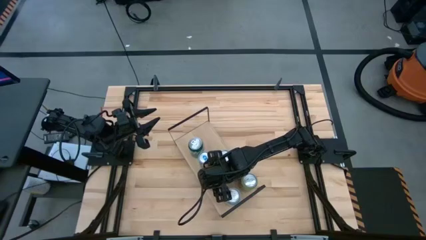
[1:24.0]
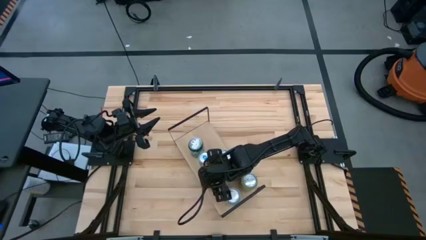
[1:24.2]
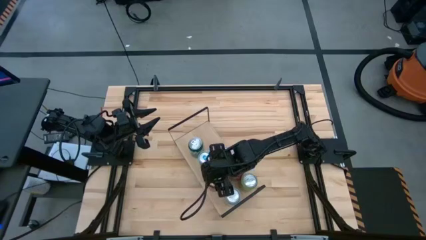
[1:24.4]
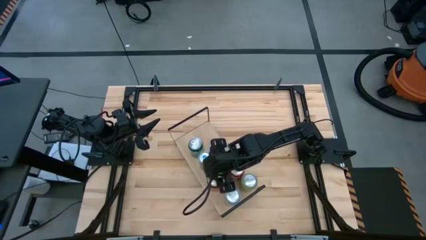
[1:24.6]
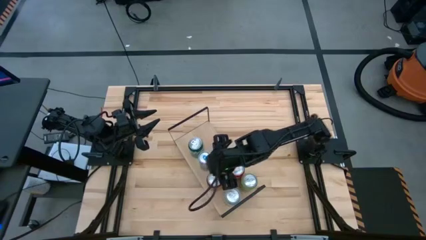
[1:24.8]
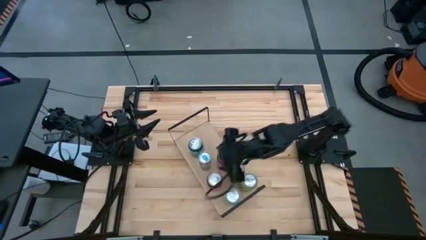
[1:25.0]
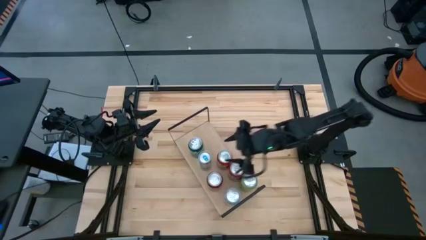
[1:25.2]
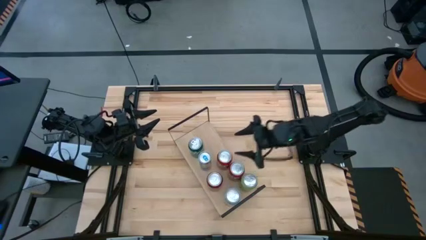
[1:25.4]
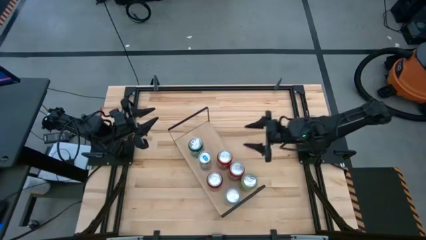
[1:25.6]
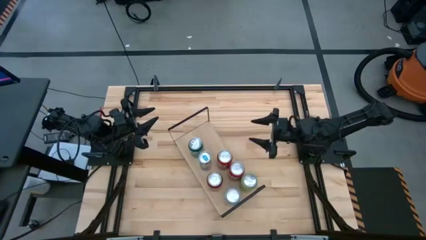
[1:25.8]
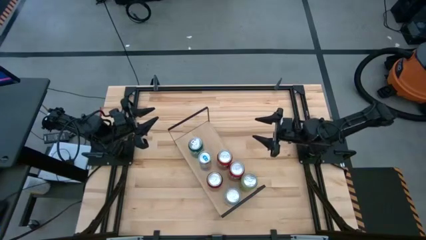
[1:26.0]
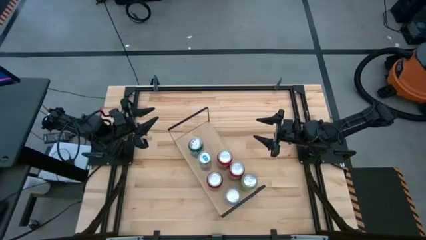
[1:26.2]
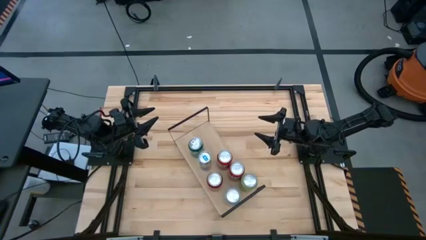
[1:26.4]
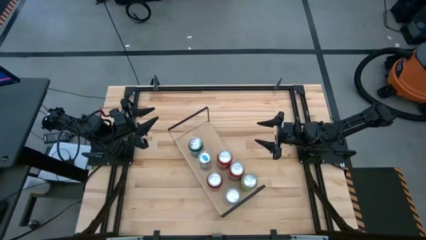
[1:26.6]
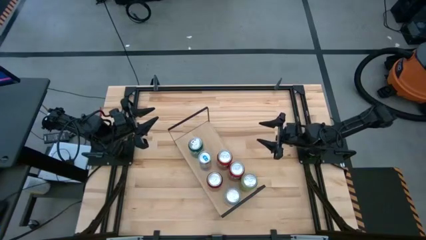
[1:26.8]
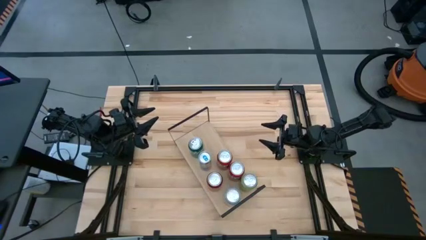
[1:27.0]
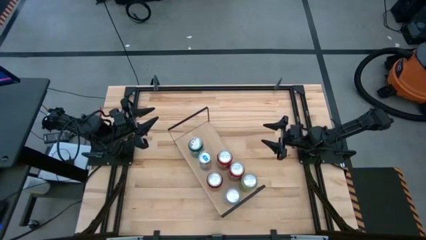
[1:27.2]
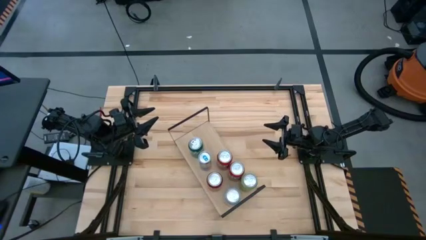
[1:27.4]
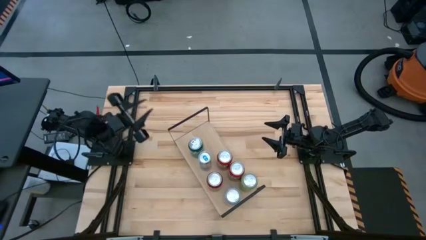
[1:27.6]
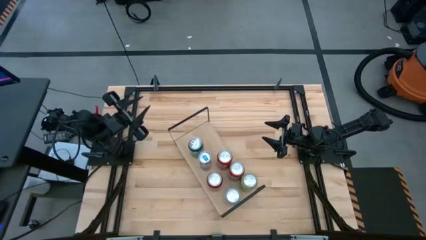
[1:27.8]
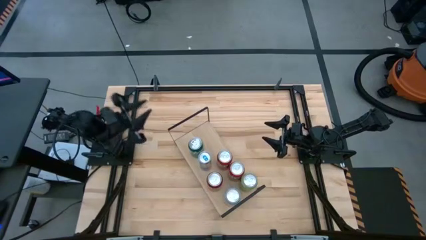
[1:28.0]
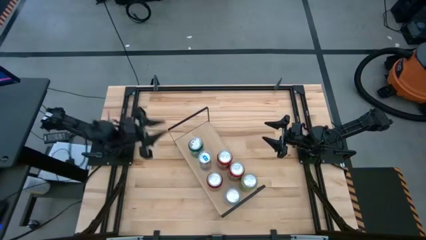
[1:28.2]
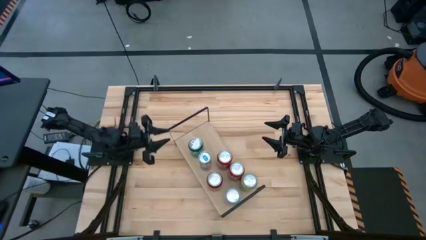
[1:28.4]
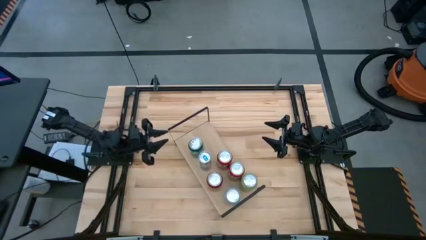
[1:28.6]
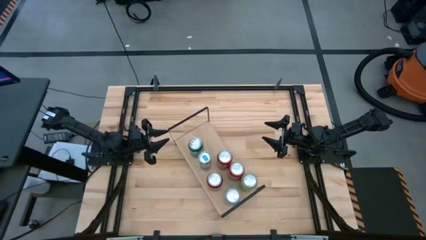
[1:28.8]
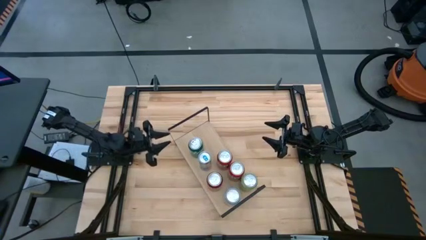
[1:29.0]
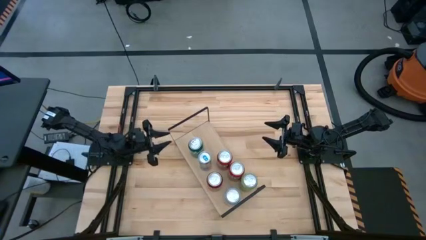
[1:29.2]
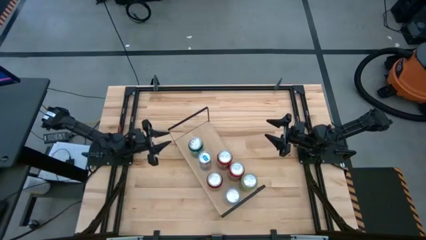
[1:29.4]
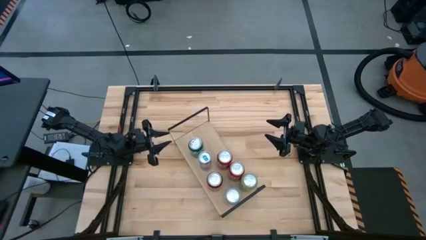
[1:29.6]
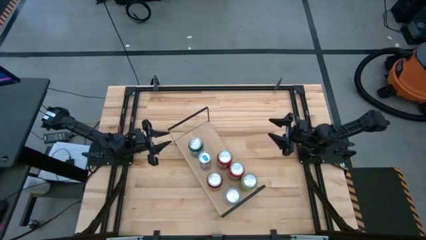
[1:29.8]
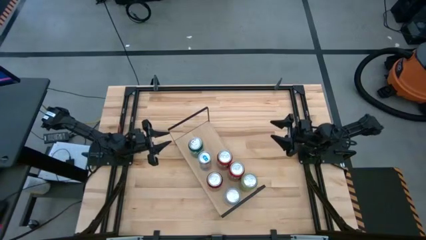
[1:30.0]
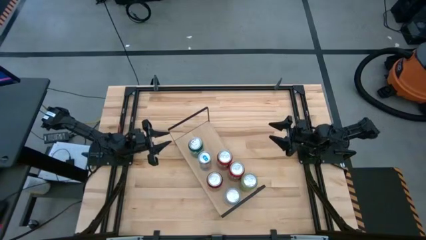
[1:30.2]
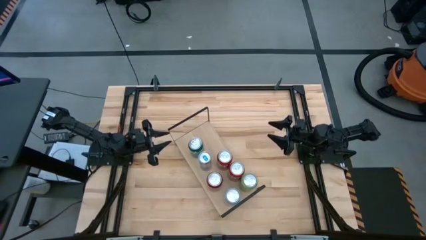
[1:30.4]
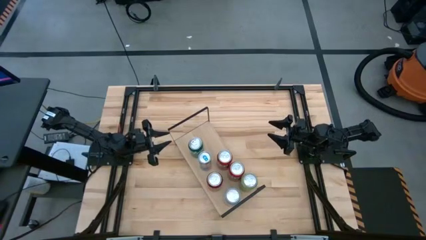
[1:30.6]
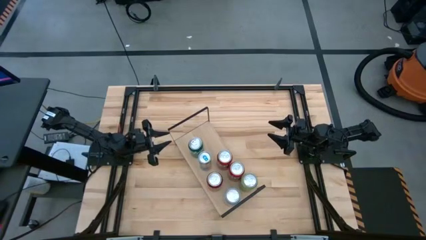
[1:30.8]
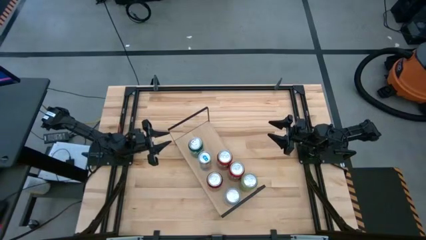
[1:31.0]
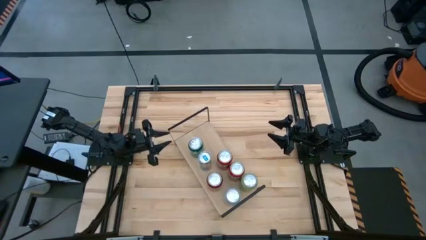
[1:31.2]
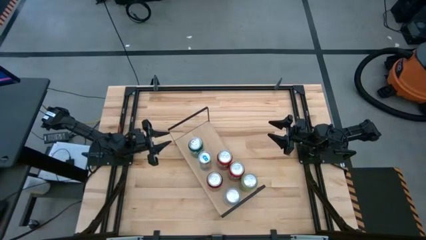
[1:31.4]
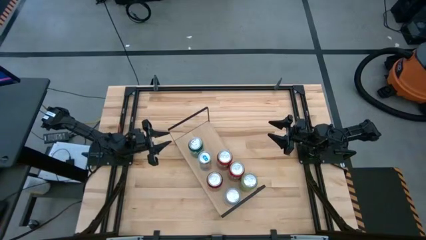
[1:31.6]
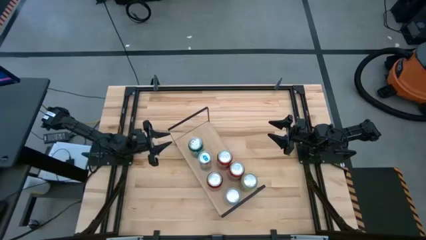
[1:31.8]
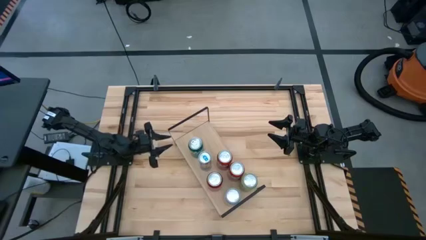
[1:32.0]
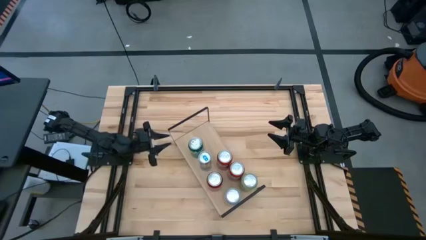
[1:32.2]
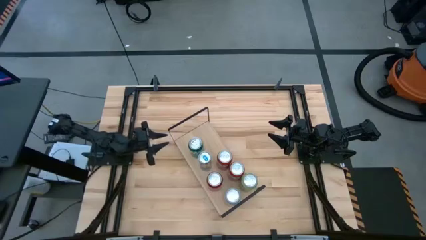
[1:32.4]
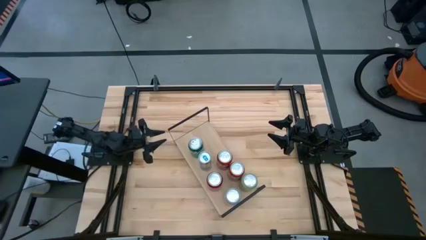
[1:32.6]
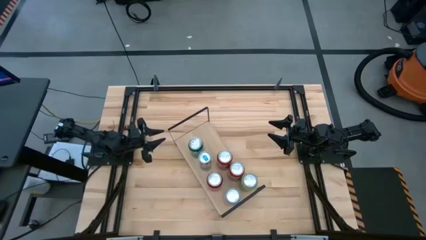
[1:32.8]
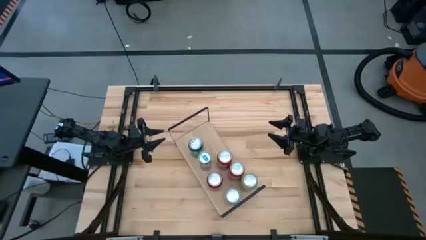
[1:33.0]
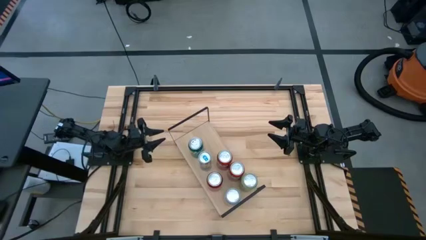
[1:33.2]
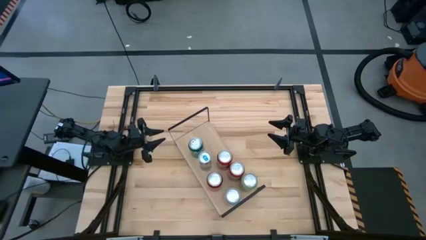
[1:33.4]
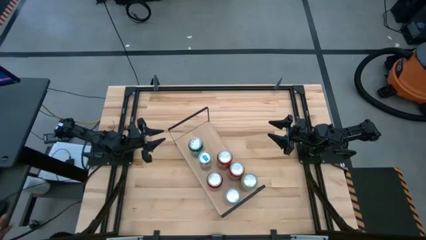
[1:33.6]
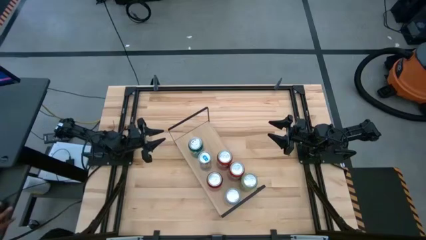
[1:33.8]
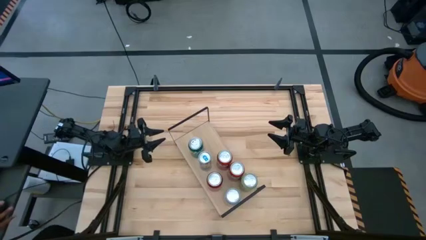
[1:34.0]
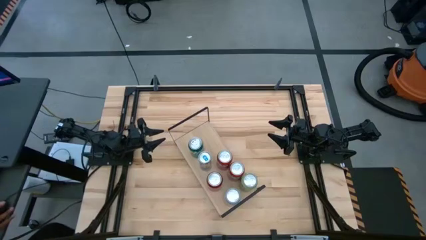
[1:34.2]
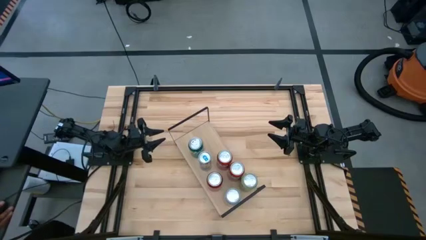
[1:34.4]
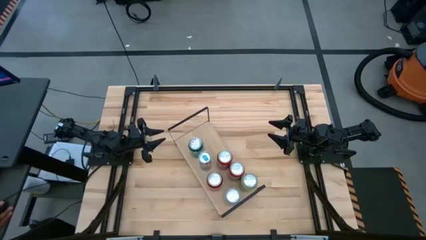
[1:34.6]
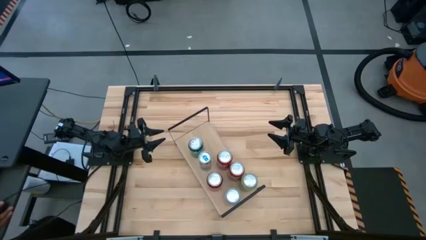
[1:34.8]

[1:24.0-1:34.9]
Task: Place canned beverage on shelf
Return to Home Position

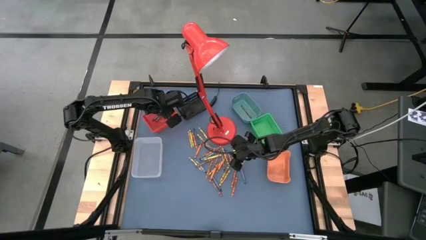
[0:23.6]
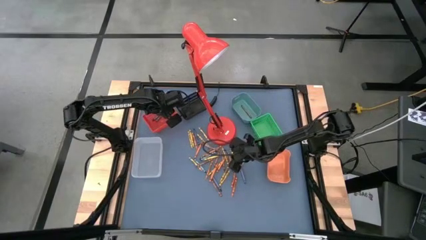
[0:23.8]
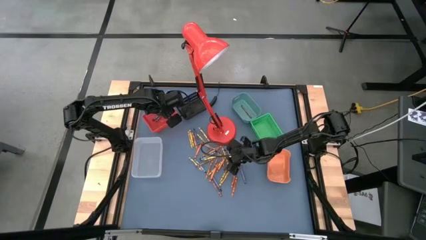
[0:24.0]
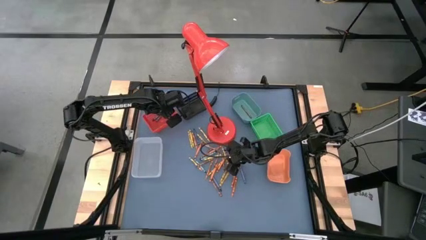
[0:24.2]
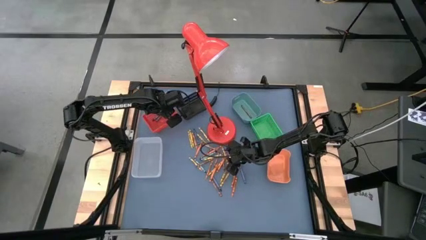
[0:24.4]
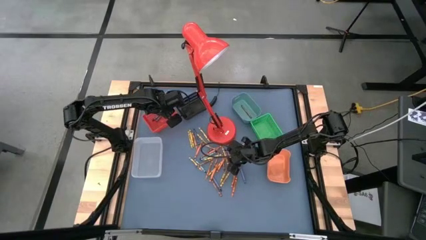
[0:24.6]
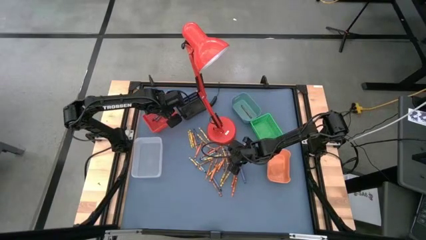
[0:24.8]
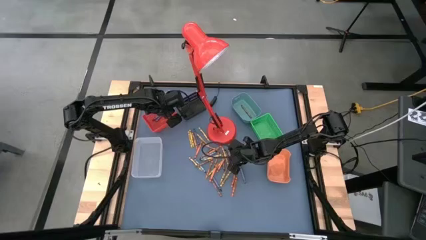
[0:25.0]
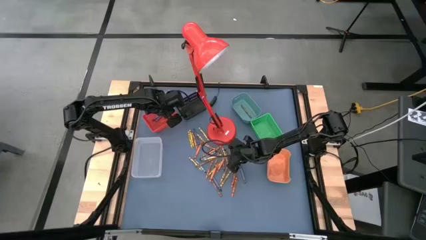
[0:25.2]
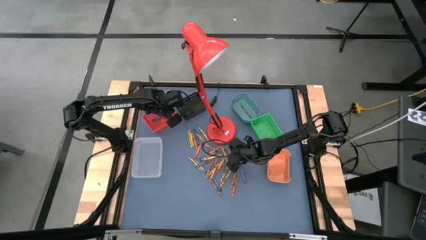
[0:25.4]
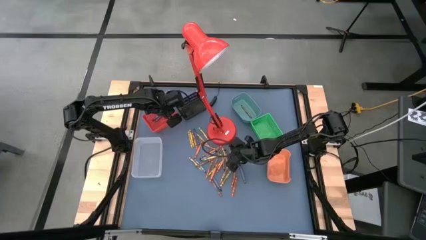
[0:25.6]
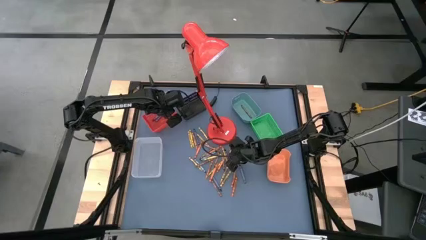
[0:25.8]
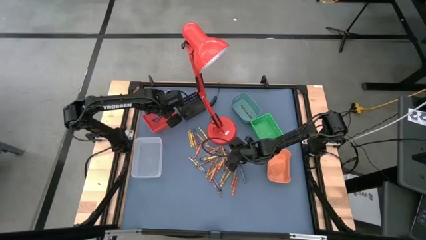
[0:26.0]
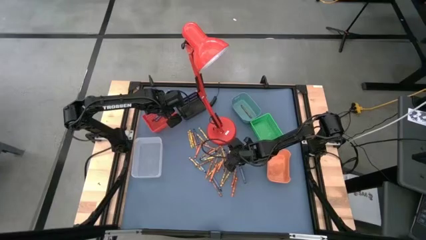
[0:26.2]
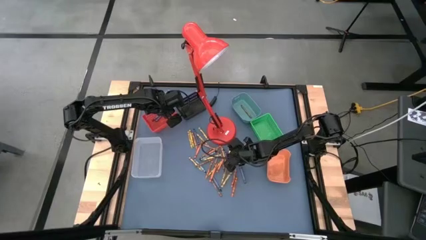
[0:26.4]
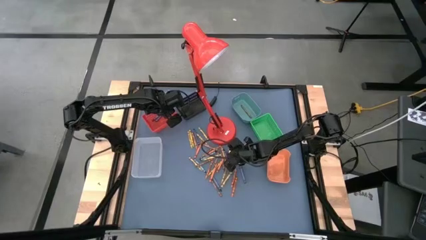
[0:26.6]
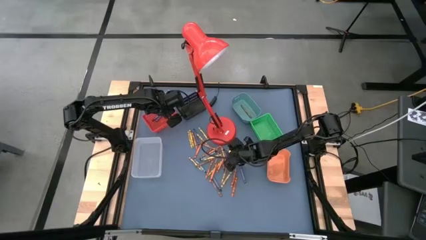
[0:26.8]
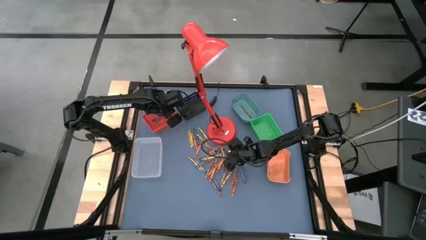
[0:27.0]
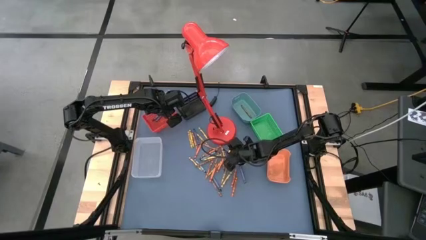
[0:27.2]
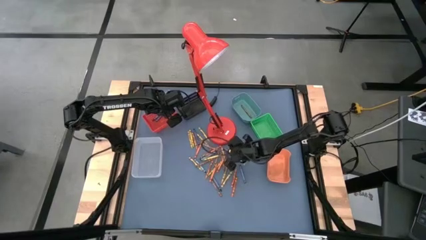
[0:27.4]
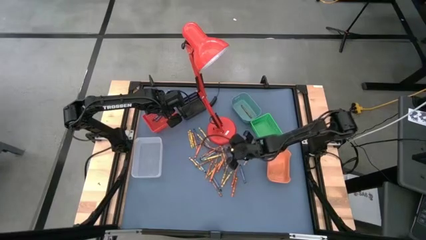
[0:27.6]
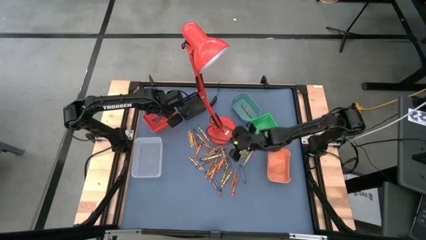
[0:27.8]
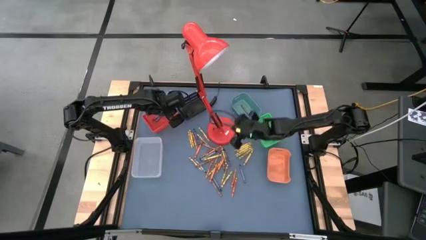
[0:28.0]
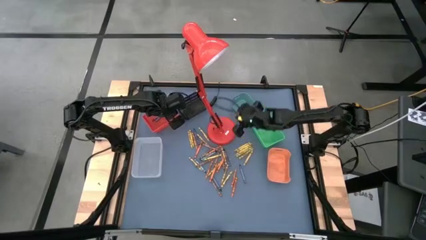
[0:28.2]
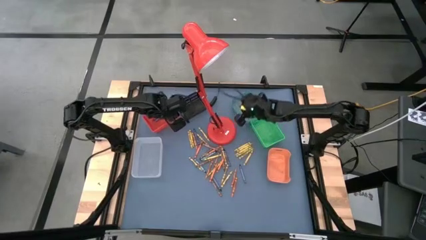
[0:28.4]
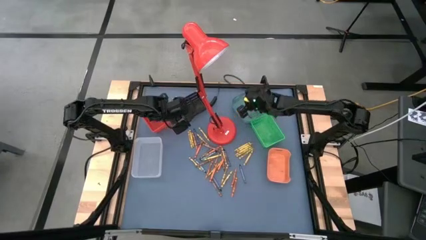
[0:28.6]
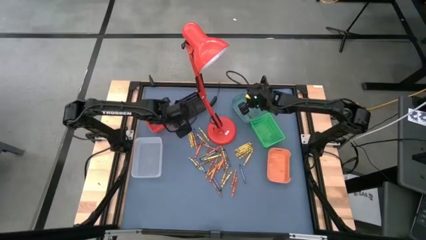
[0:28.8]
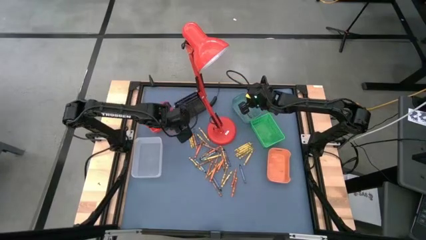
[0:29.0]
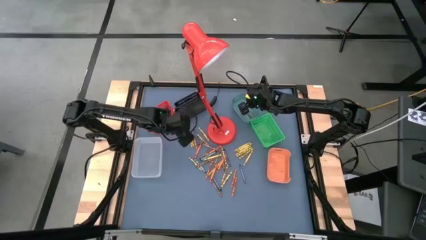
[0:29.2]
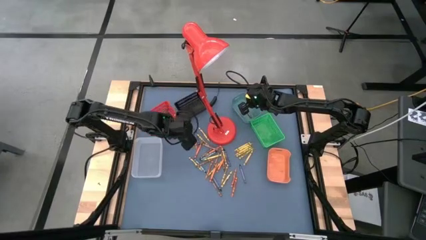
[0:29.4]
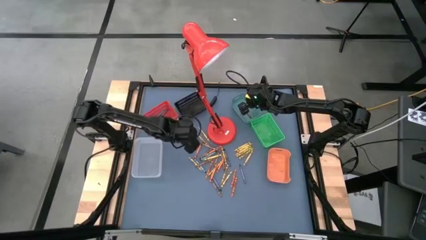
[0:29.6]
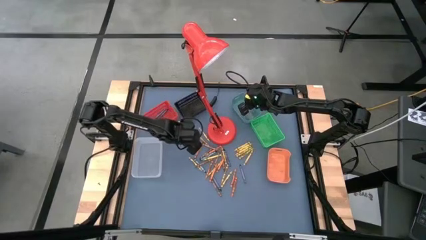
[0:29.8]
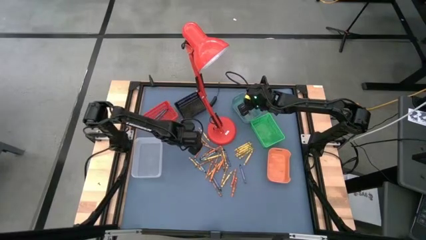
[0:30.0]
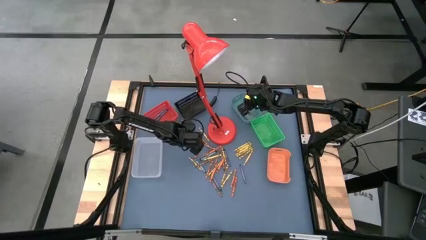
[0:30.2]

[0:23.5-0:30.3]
Task: Sort crayons
Put the brown crayon into the top right blue bin
